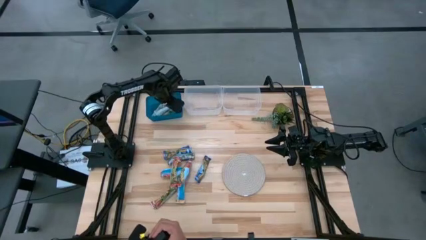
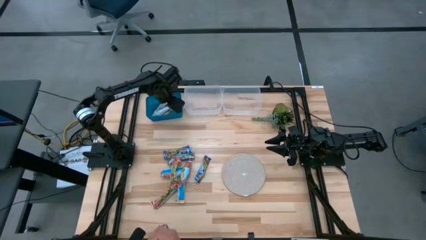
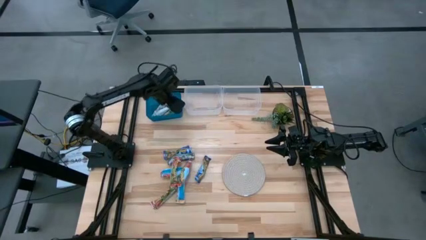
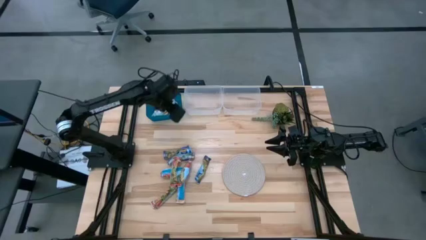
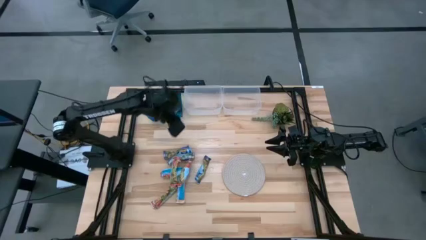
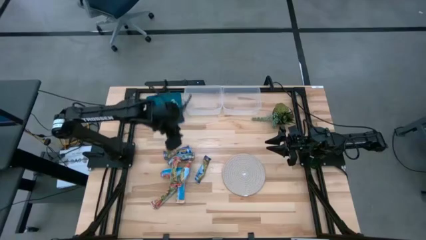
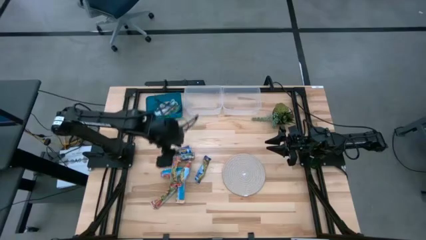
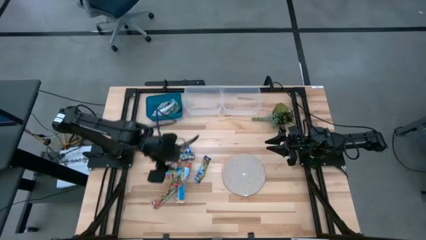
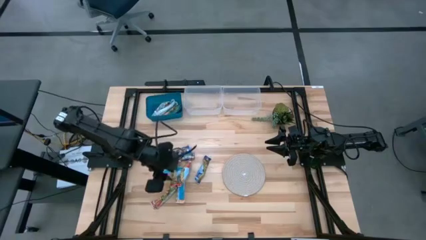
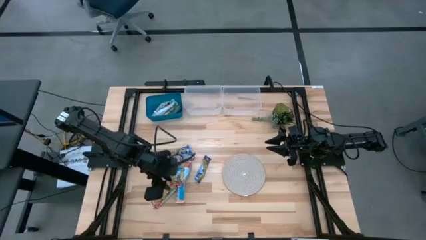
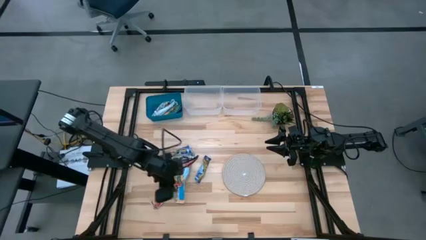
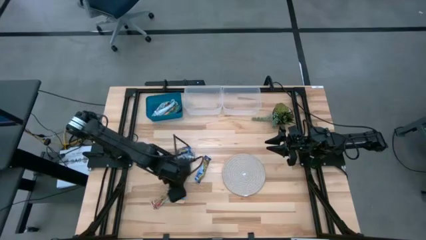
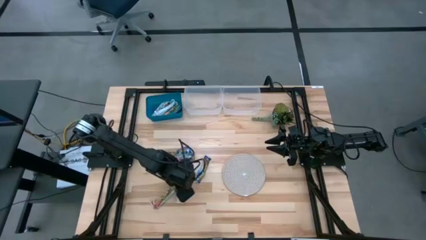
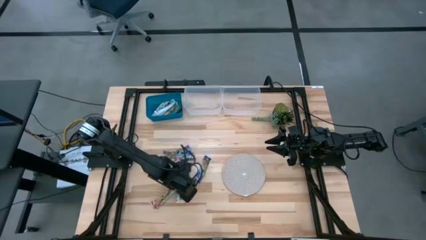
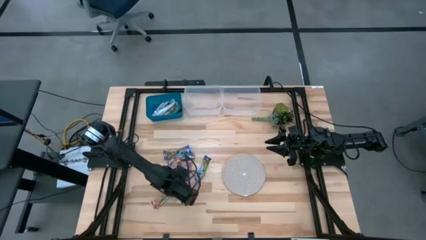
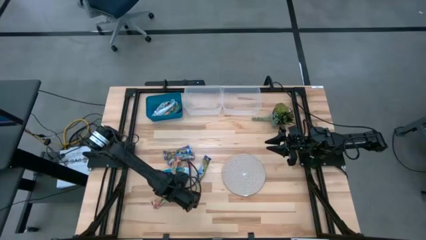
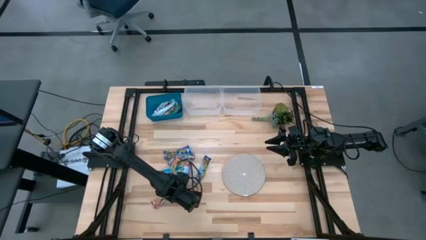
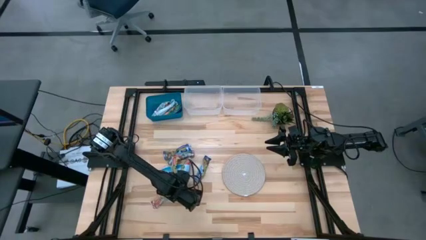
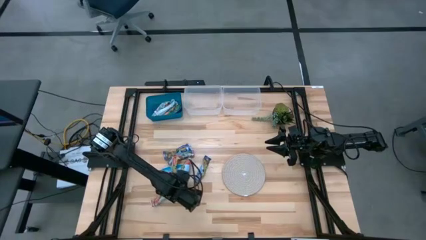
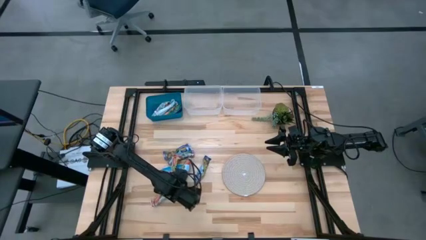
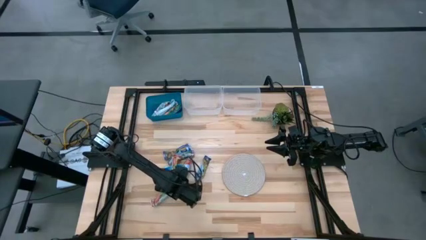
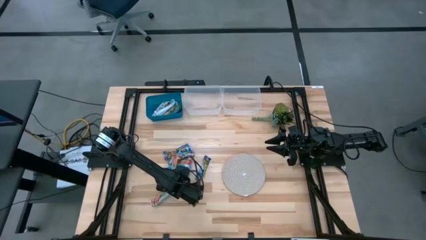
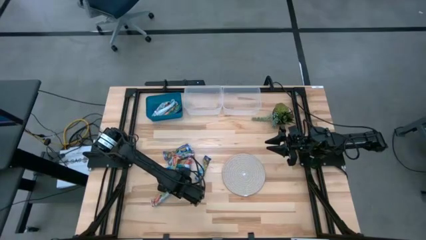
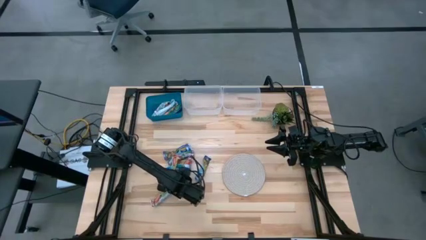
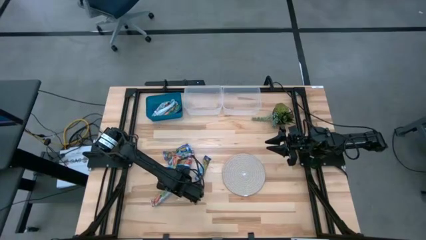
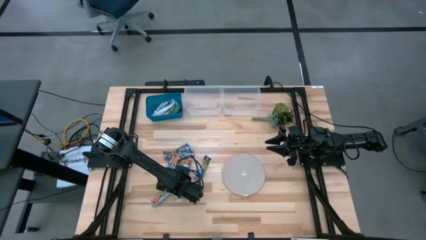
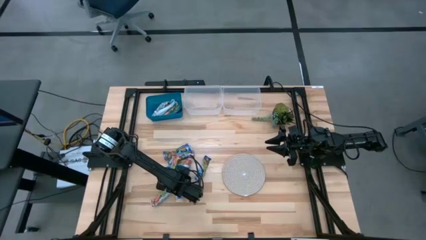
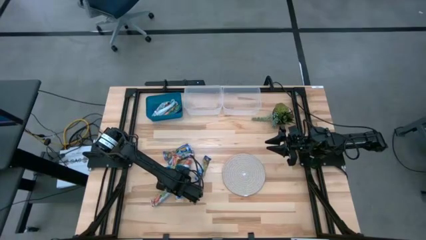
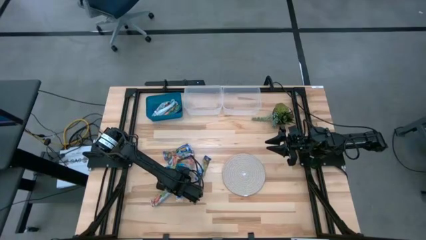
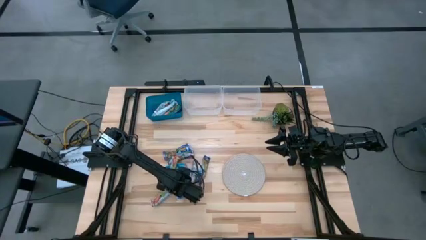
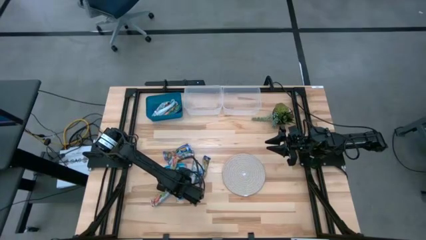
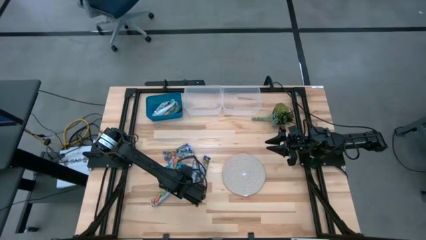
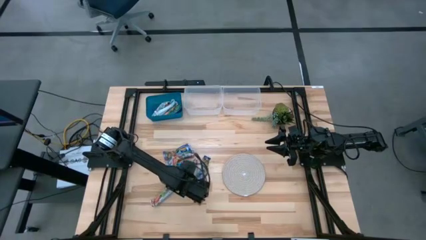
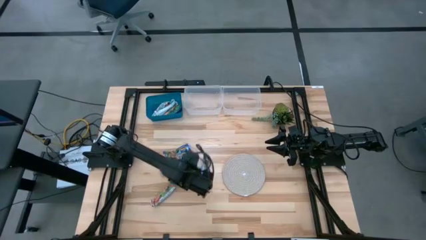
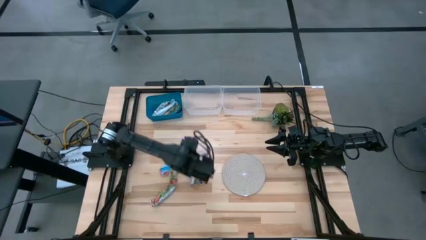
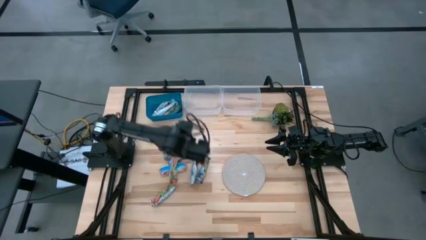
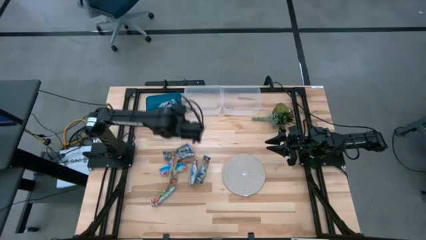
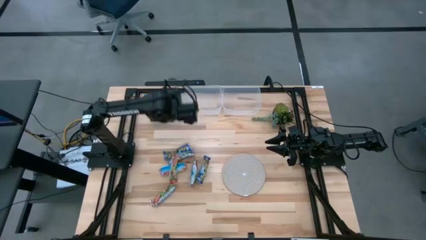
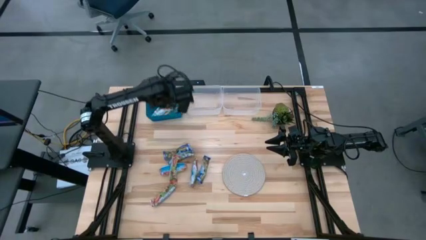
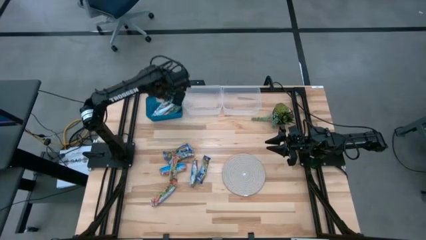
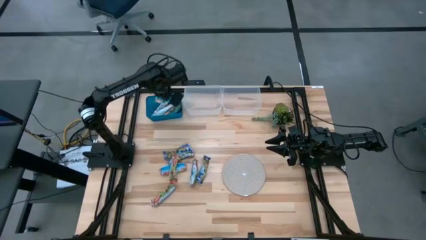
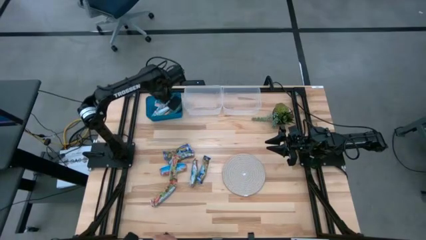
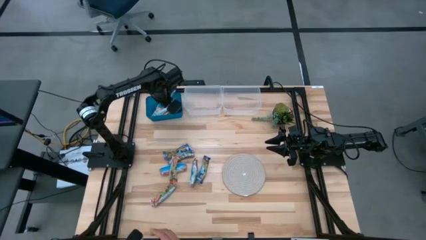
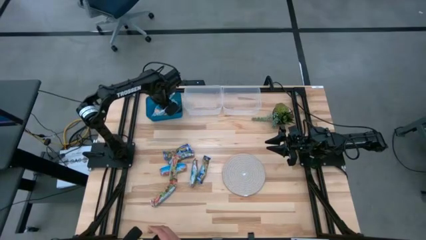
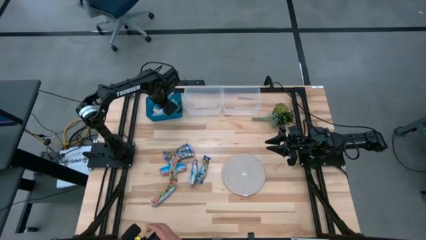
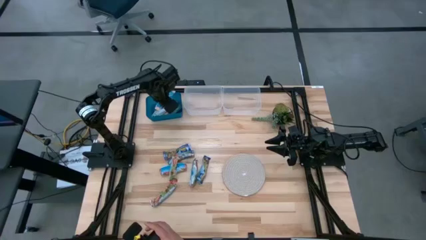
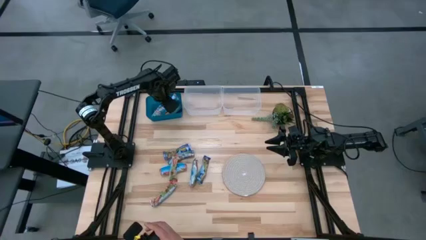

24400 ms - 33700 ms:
Task: Pick and place Granola Bars by type
Put the yellow granola bar into the blue bin

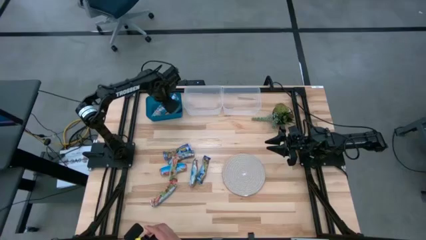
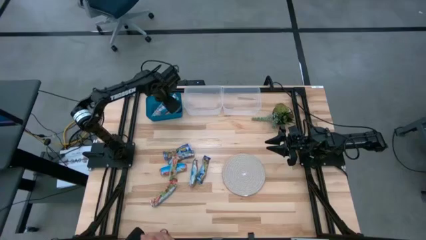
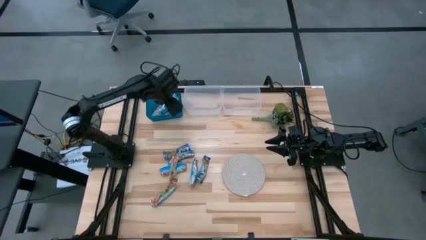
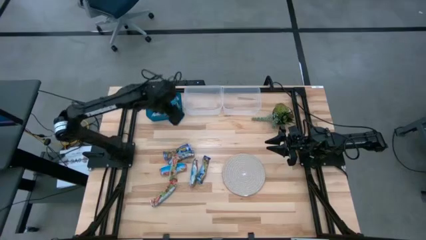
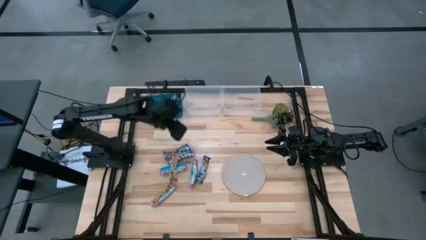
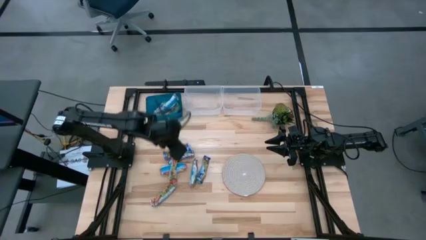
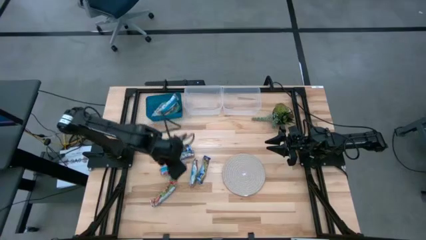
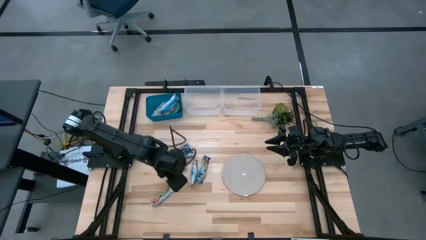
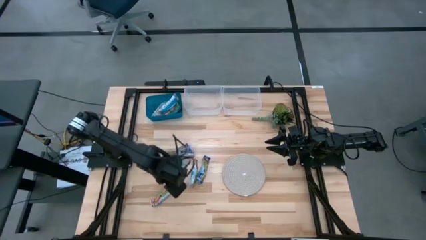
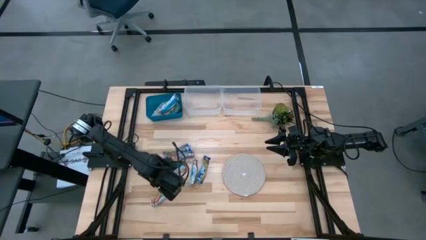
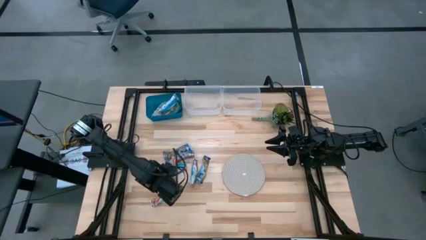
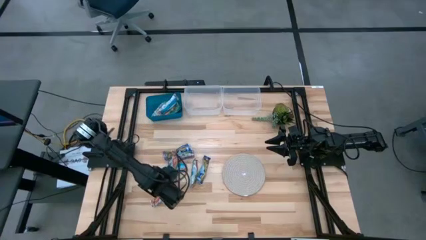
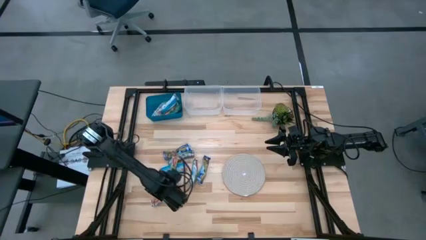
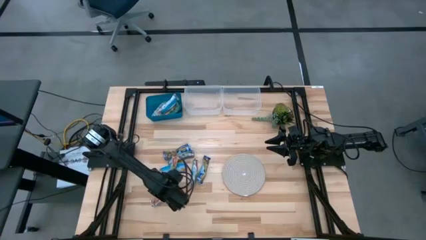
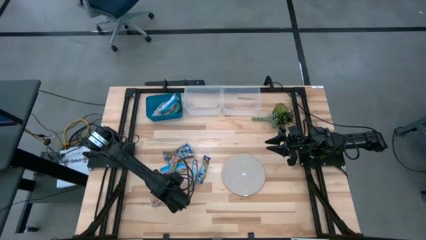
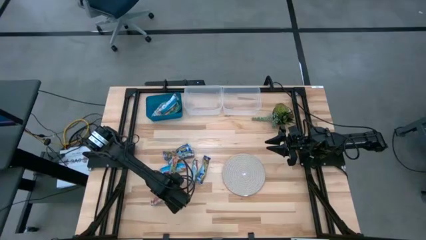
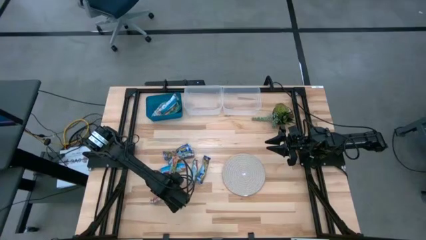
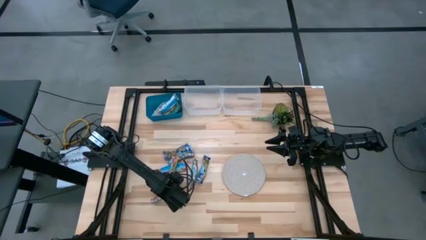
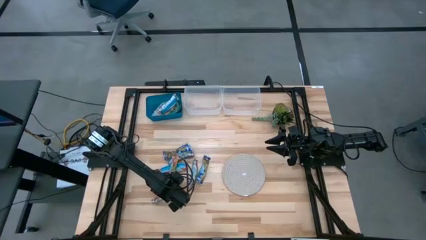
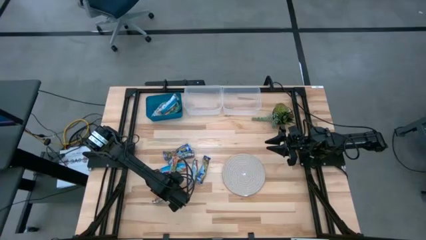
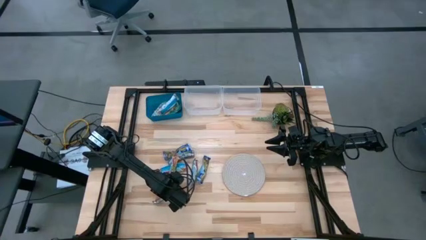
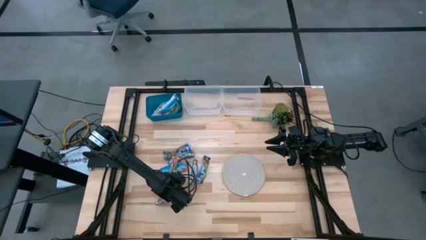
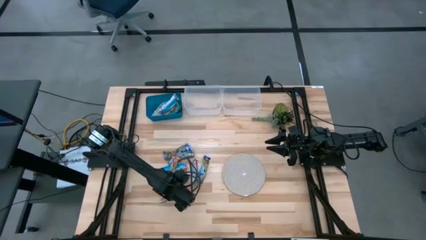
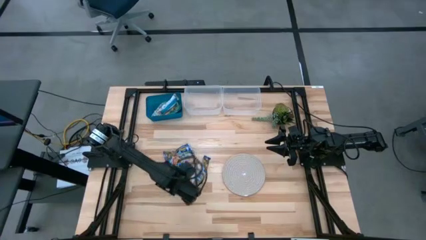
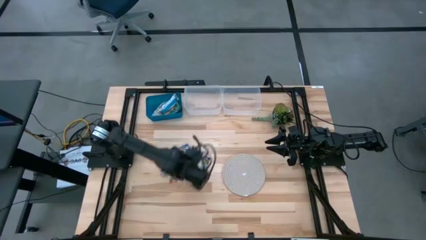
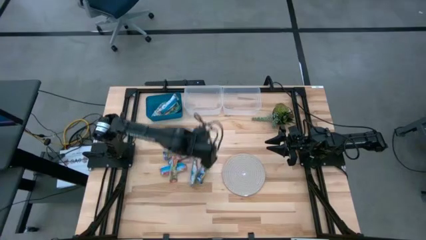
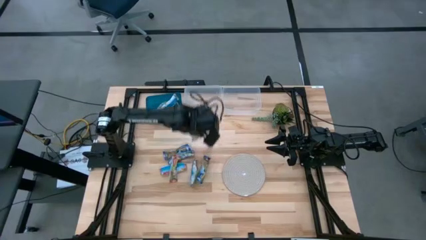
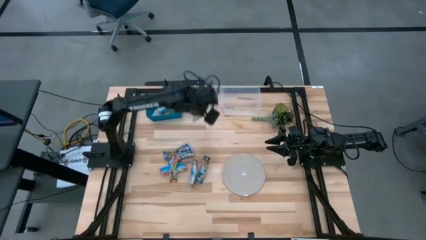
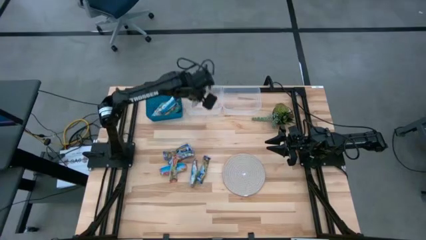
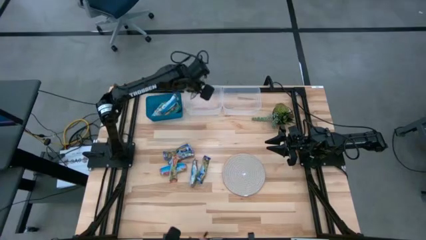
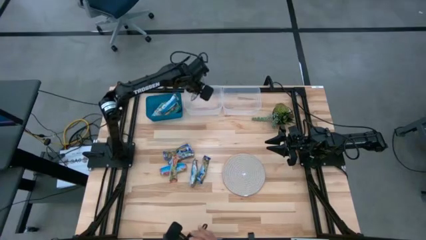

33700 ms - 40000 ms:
Put the red granola bar into the left transparent bin

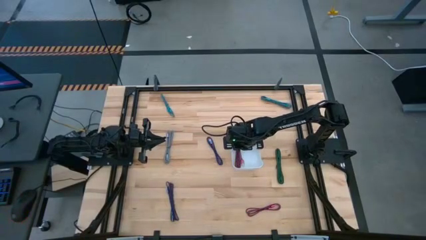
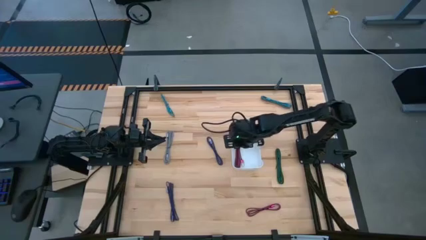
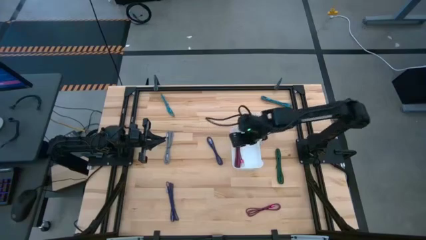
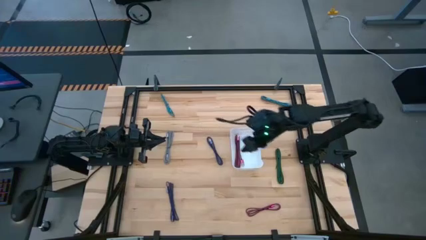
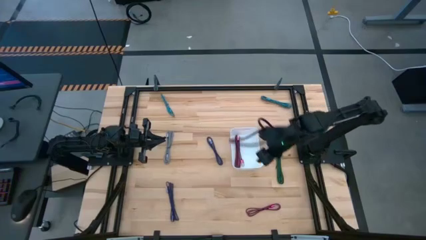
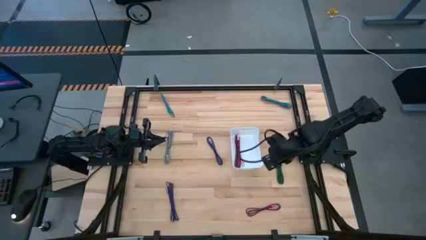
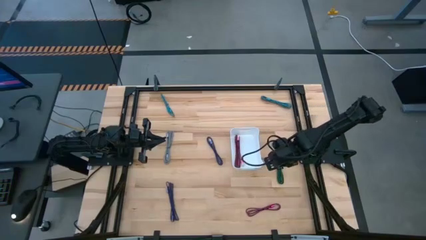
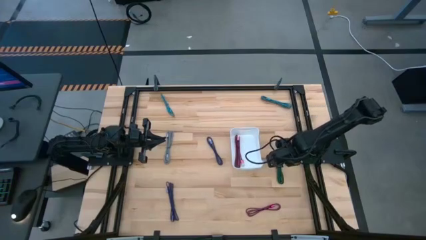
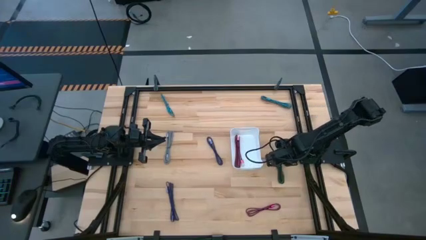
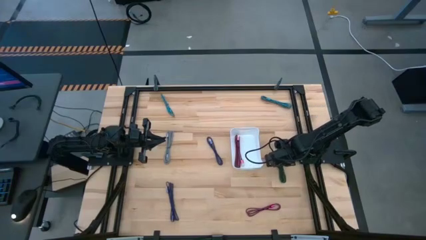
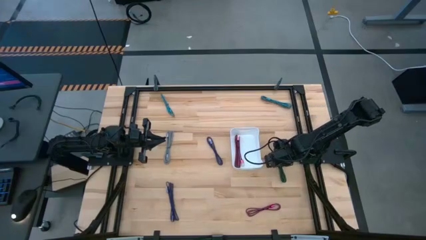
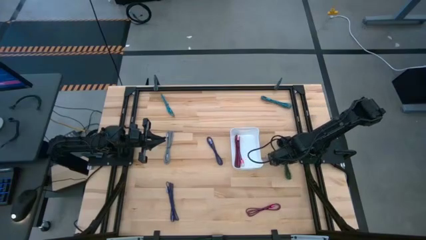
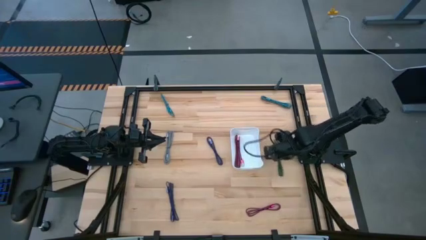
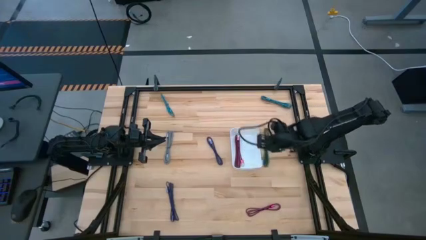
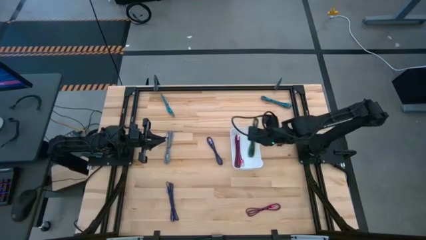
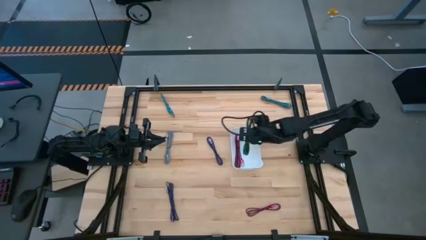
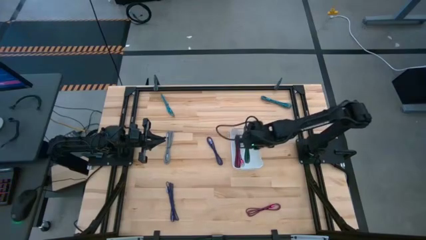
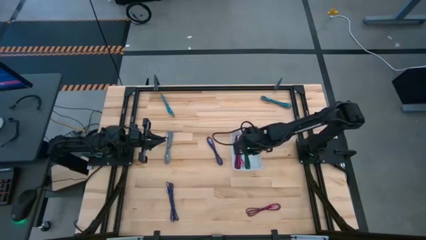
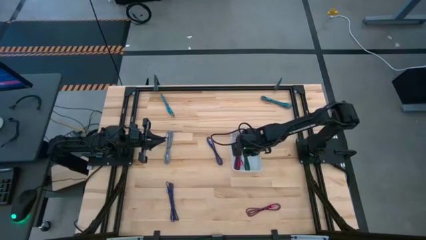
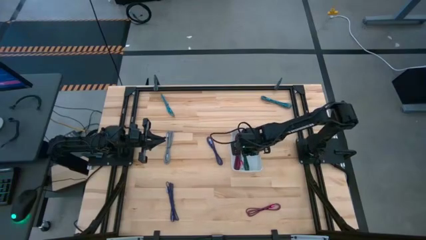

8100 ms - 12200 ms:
Task: Pick and place USB-C Cables
Put the green charger cable into the white bin
